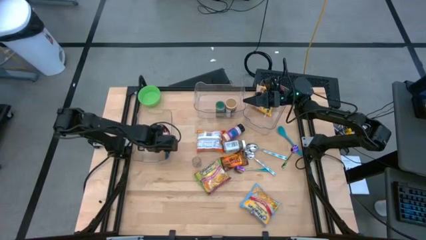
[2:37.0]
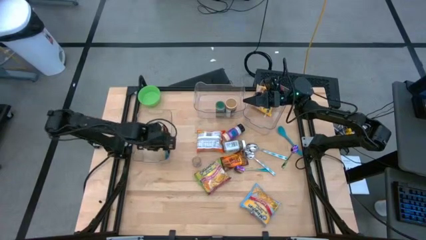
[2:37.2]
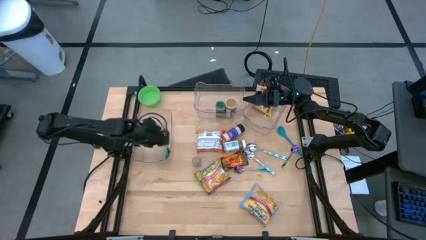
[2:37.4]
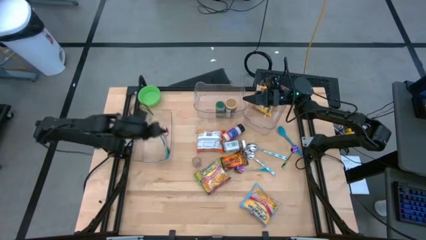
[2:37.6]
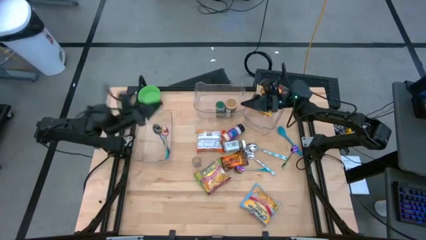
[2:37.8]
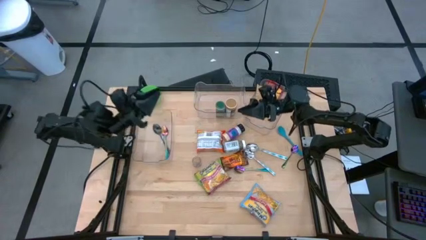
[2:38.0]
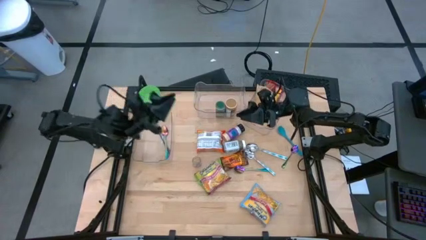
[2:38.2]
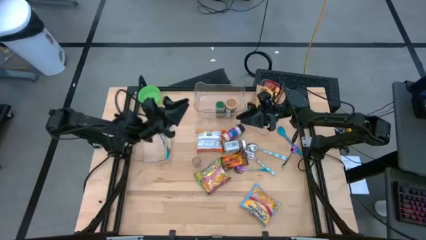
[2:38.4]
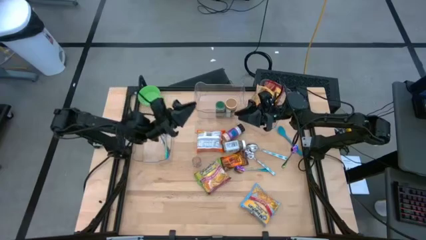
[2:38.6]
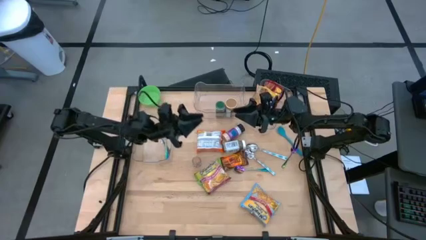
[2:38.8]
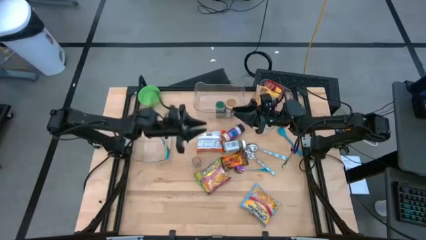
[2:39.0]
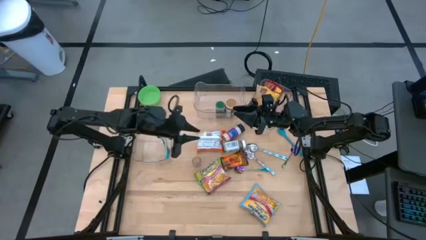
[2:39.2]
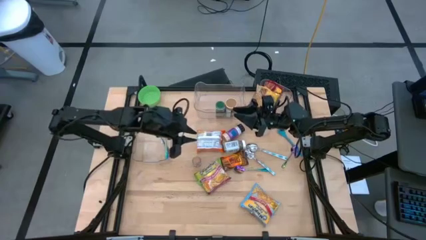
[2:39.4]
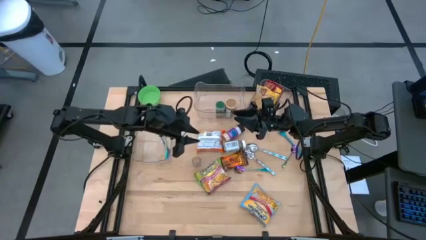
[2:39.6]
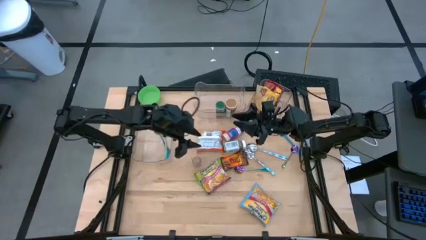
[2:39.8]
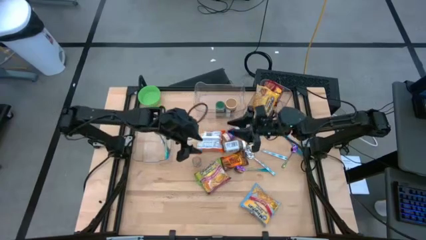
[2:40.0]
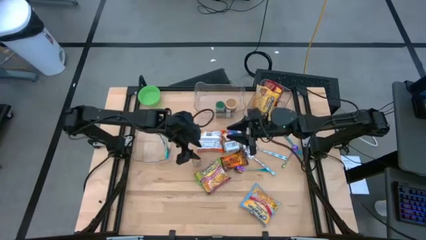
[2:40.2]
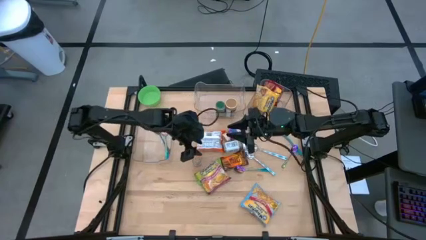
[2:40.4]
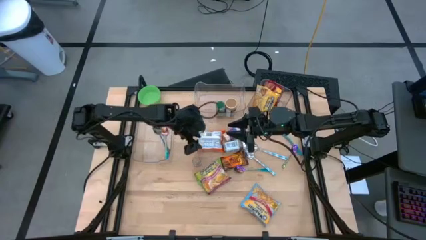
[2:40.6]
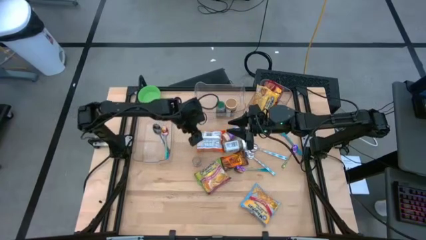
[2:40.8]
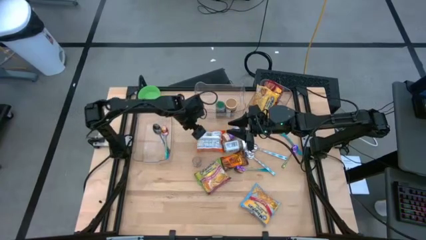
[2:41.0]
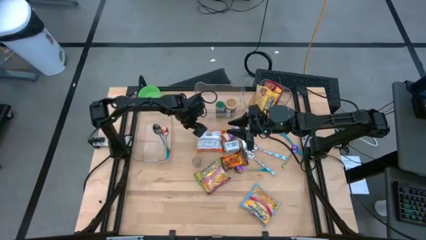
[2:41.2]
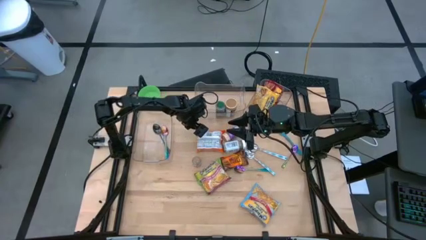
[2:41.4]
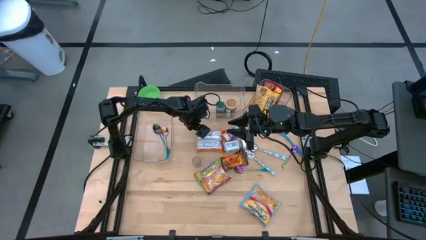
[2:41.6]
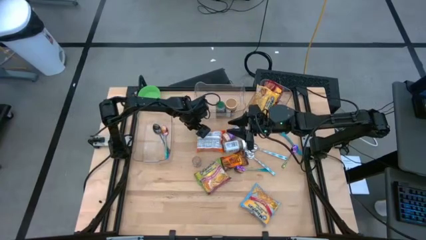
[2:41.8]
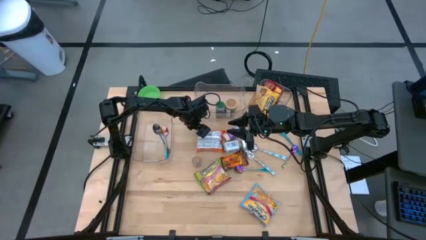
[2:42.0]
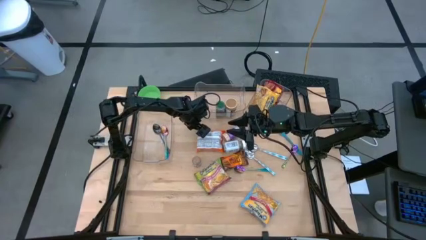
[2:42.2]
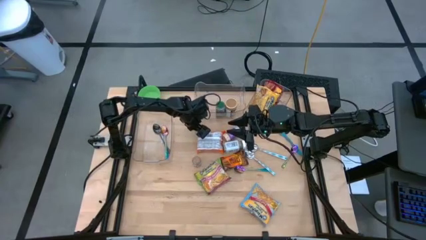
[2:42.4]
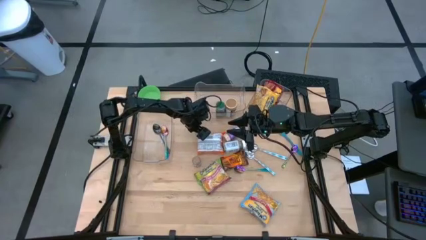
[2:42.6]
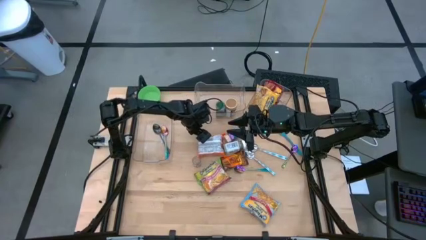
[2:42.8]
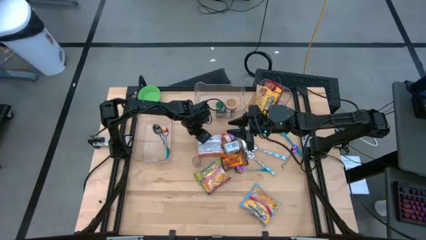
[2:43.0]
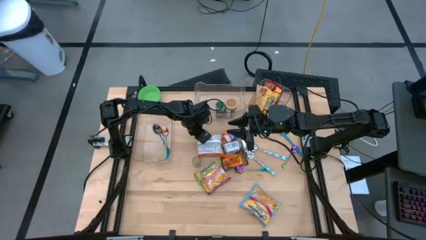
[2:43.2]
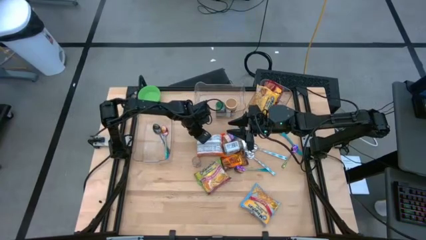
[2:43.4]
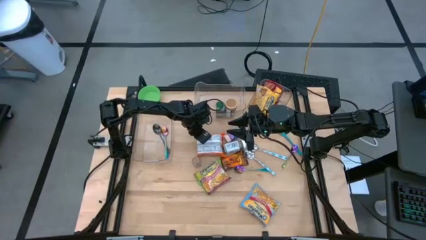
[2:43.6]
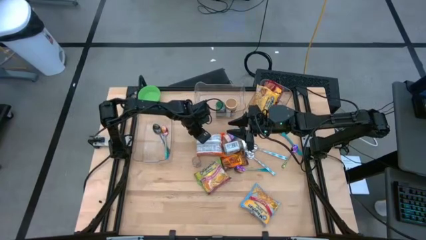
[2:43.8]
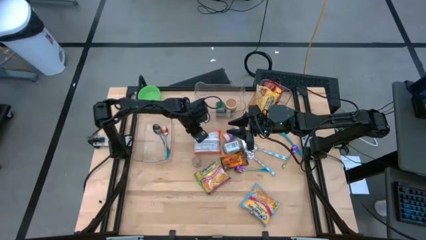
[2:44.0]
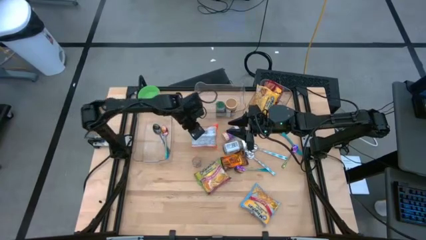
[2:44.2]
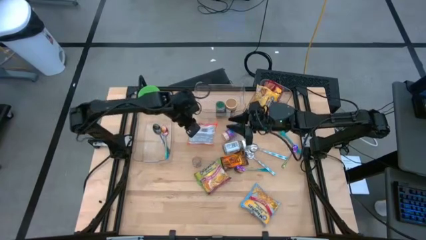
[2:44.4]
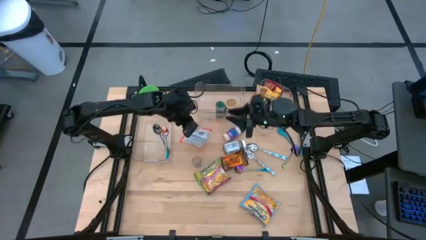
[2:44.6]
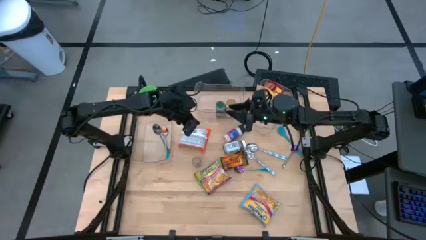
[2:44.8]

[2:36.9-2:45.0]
Task: Pick & Place Food Item
Put the orange noodle pack into the right transparent bin

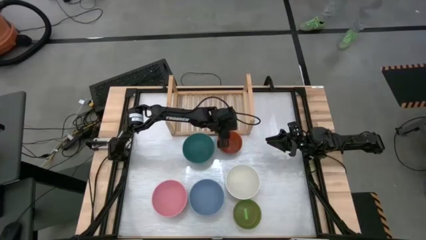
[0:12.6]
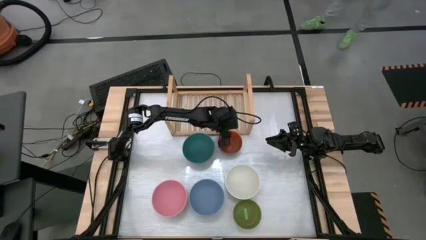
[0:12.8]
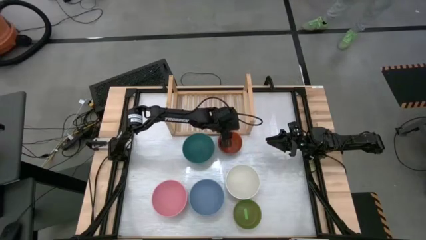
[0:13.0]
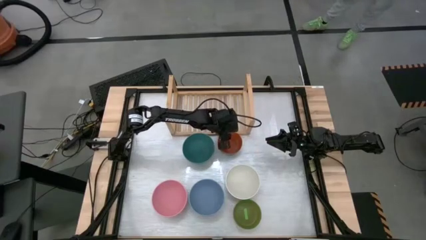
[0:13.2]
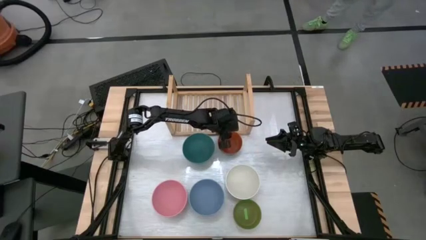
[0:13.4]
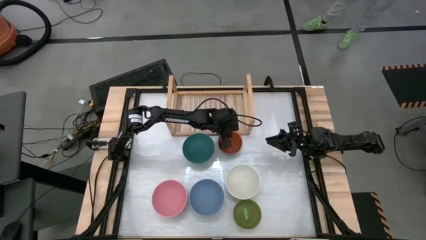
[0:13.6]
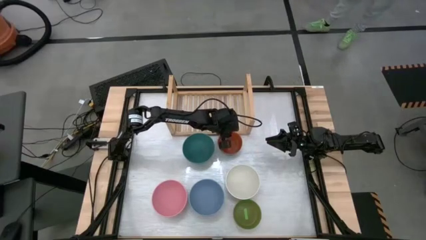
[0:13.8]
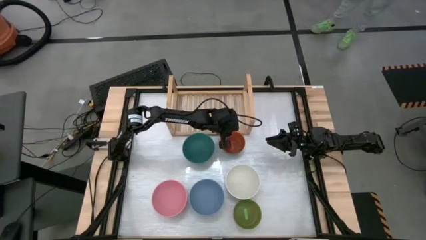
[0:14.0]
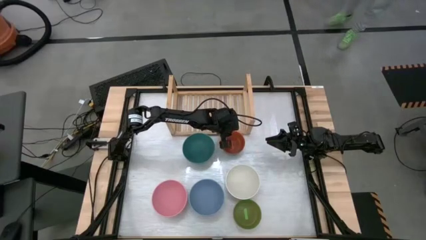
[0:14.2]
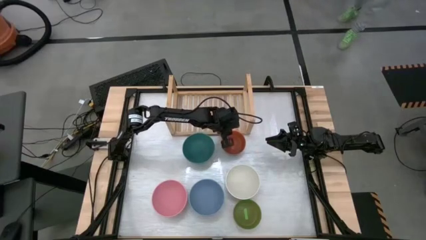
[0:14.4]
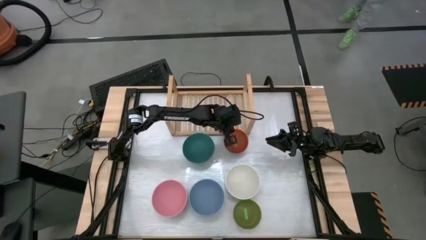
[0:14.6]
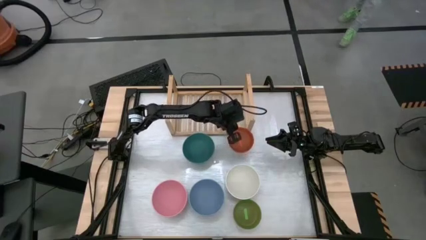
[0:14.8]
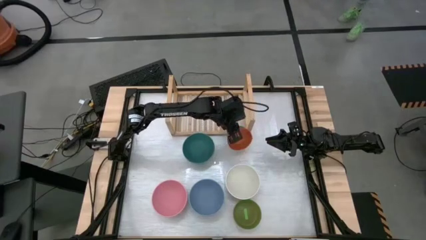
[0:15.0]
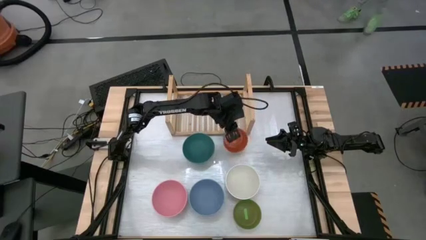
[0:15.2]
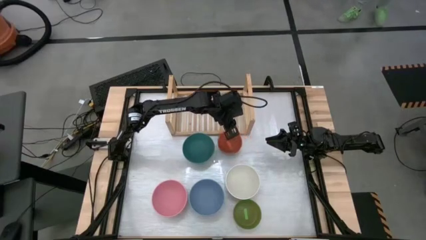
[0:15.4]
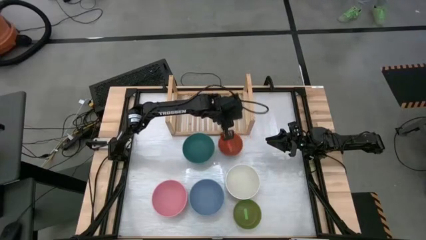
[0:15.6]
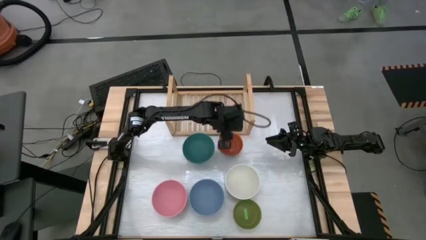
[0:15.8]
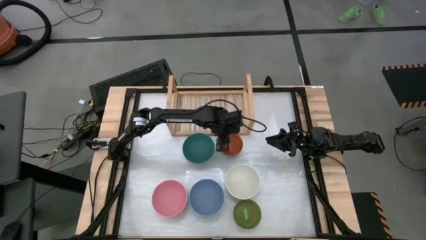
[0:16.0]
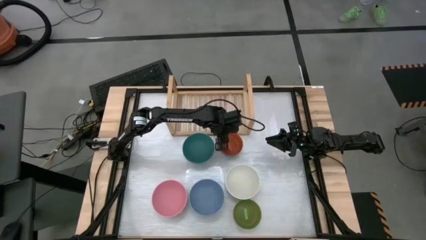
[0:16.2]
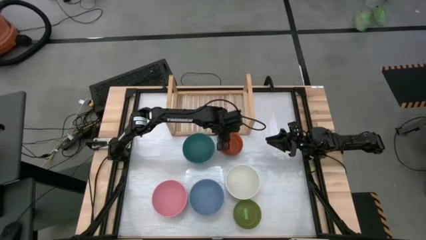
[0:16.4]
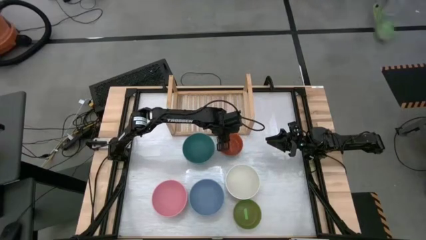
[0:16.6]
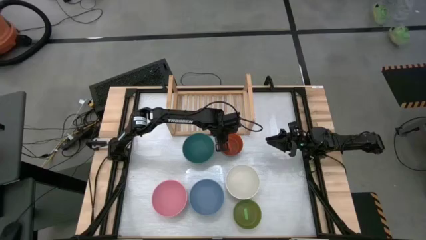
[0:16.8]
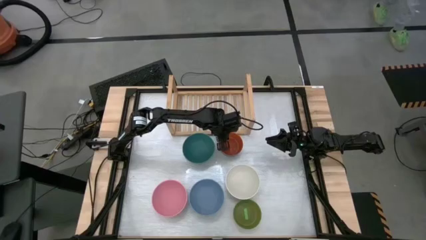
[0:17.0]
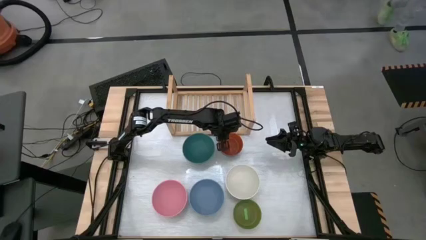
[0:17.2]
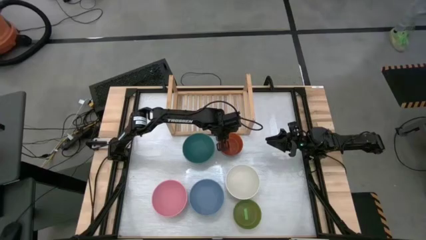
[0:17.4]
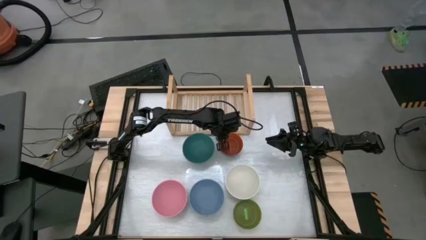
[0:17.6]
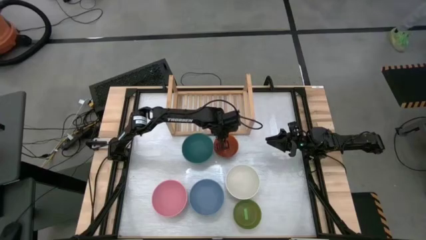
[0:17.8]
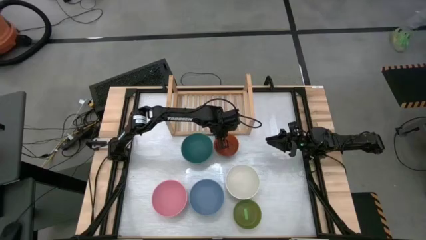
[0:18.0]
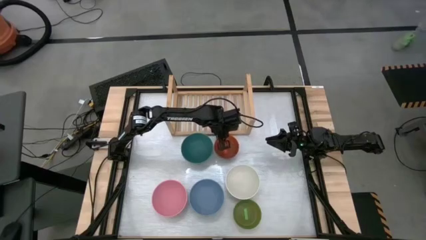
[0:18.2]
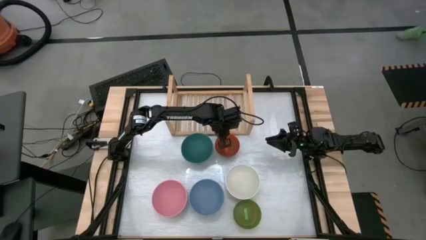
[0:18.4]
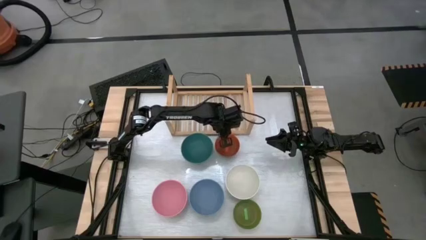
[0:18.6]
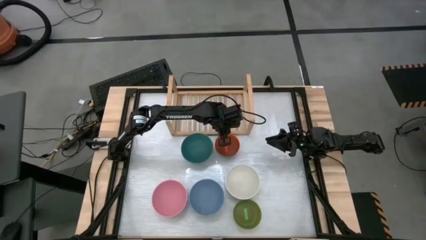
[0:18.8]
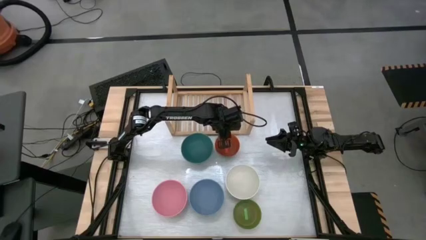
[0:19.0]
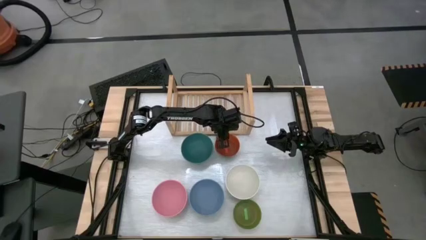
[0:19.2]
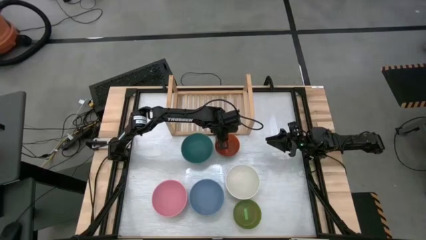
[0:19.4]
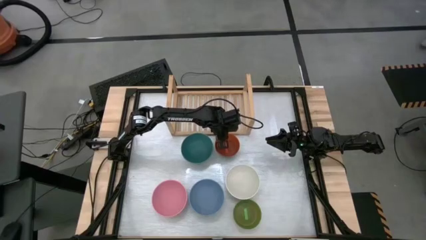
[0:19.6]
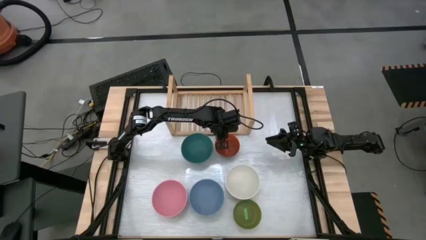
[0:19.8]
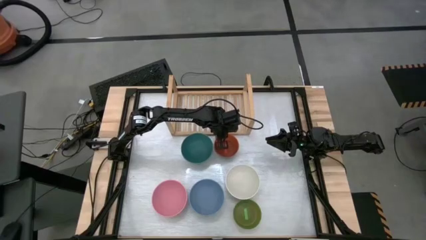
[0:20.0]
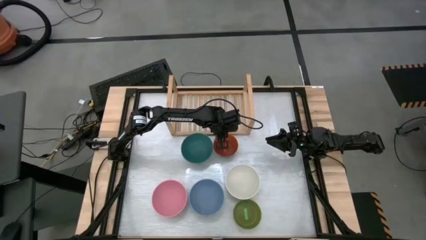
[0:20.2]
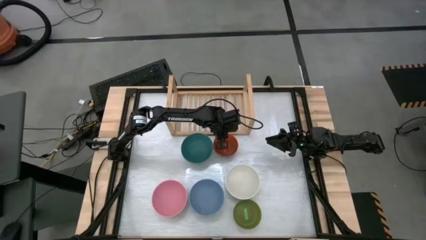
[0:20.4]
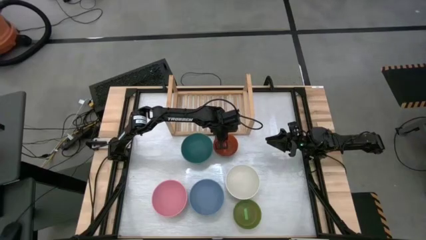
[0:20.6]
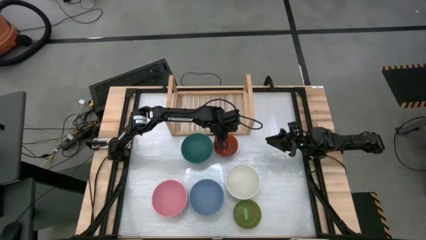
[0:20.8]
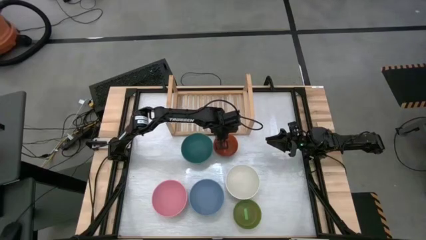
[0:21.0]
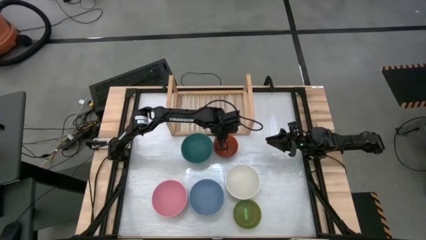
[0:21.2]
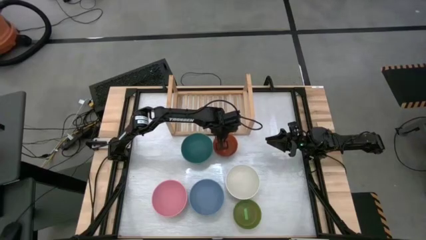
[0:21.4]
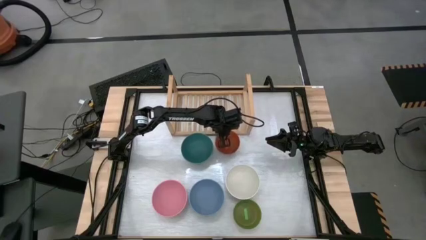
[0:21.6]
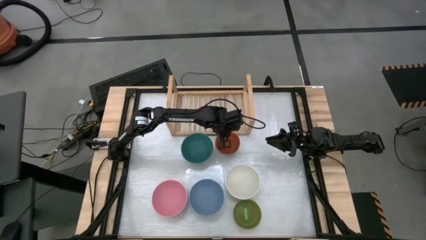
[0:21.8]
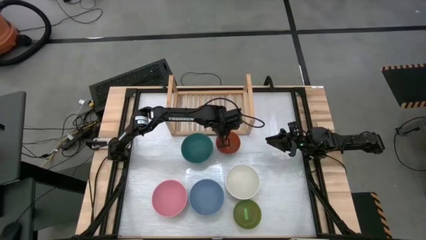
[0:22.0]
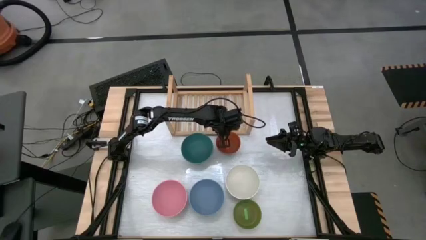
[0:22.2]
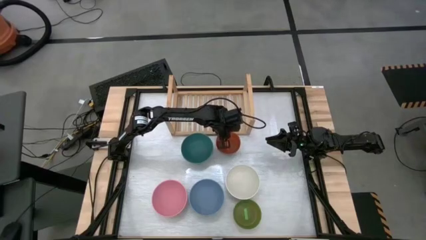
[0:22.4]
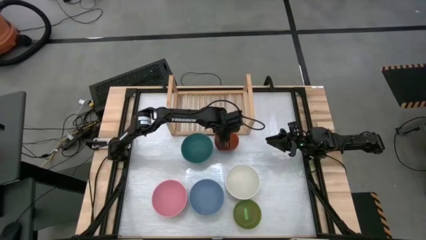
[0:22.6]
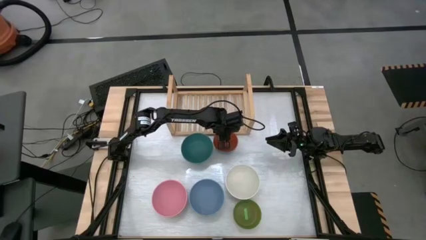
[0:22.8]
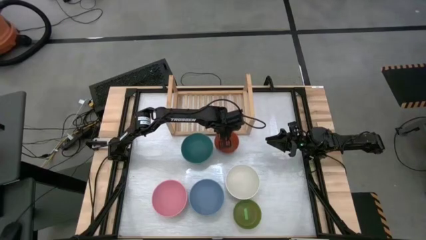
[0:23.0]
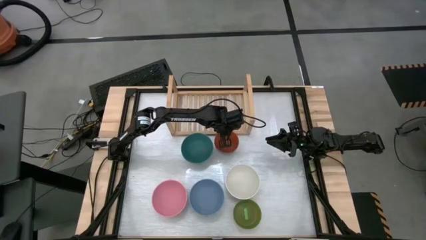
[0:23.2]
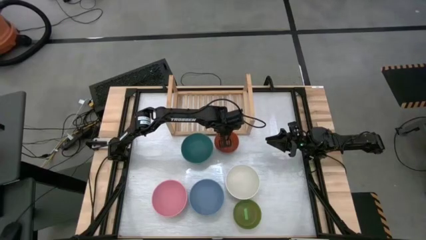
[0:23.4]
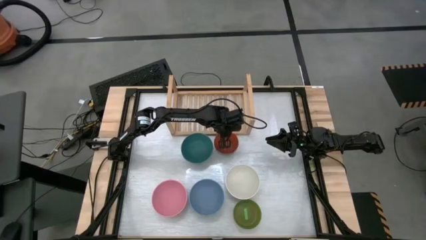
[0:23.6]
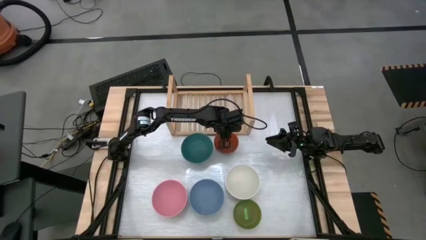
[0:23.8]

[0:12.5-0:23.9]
Task: Place and stack bowls onto a shelf
Stack the colored bowls by size on the shelf
